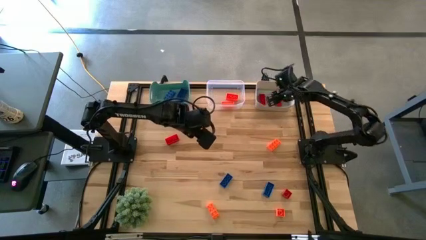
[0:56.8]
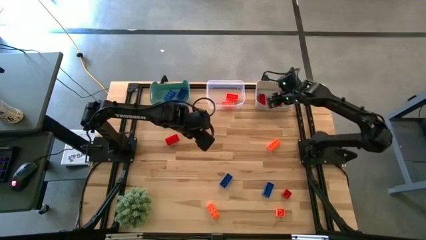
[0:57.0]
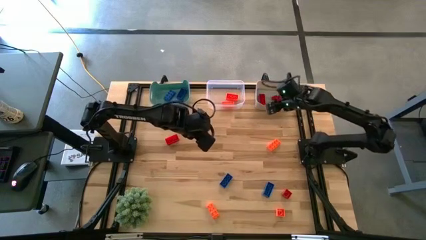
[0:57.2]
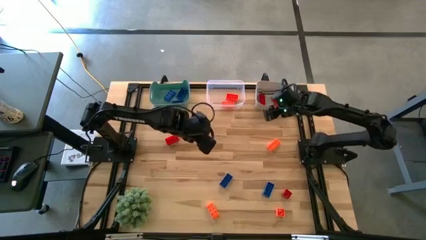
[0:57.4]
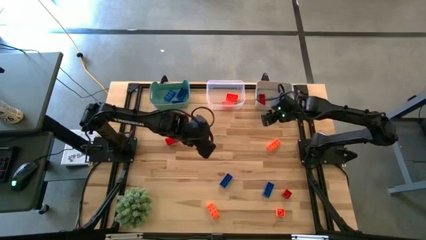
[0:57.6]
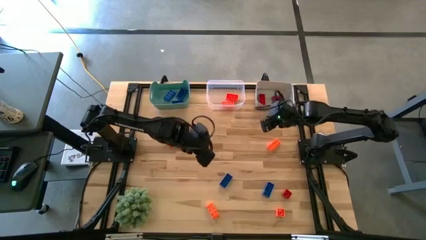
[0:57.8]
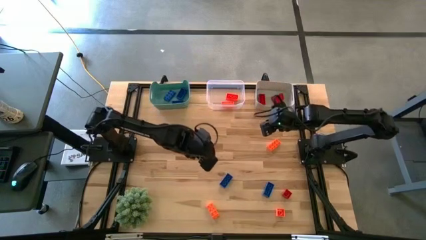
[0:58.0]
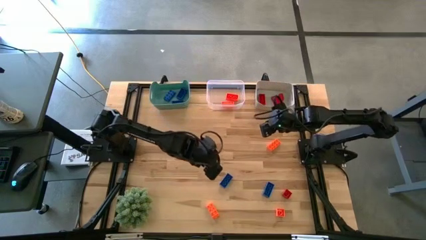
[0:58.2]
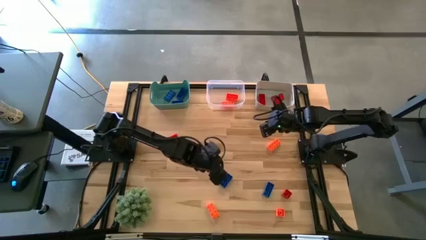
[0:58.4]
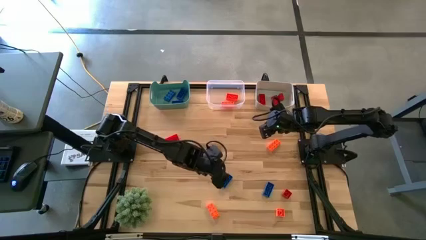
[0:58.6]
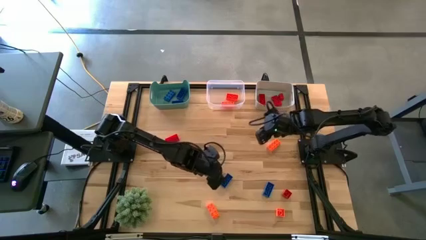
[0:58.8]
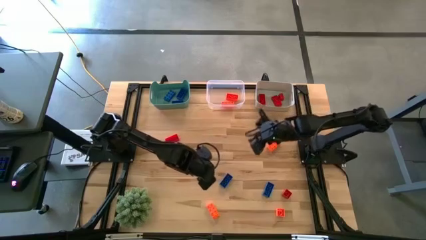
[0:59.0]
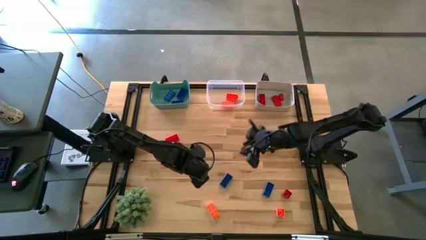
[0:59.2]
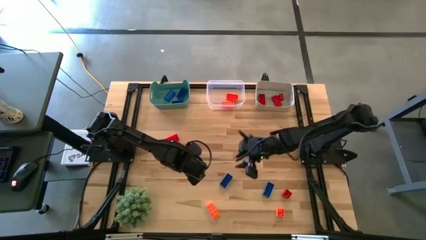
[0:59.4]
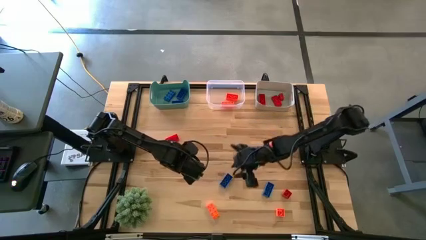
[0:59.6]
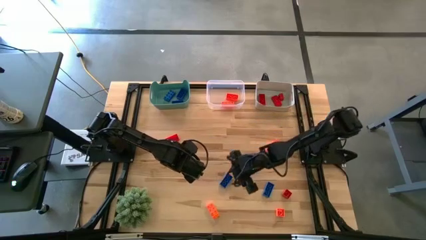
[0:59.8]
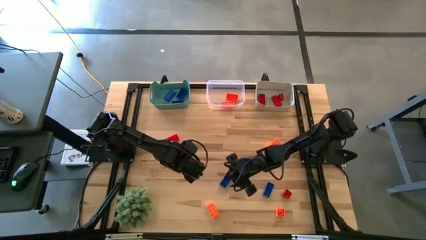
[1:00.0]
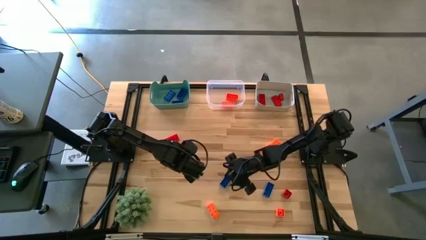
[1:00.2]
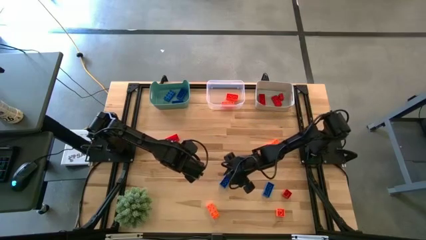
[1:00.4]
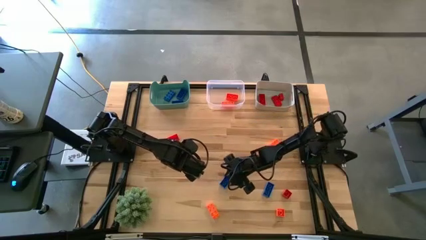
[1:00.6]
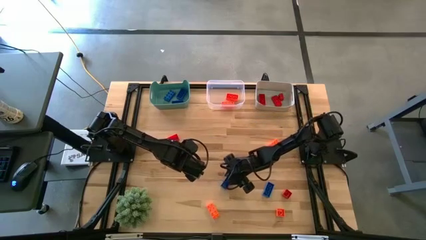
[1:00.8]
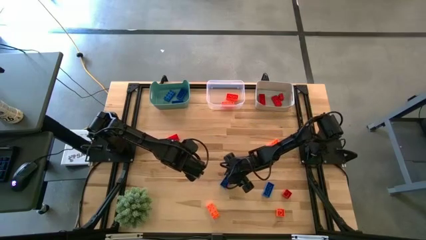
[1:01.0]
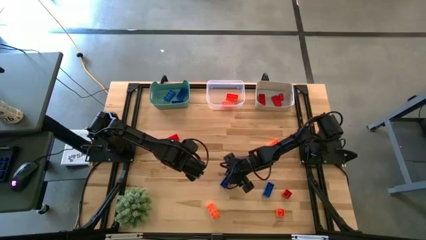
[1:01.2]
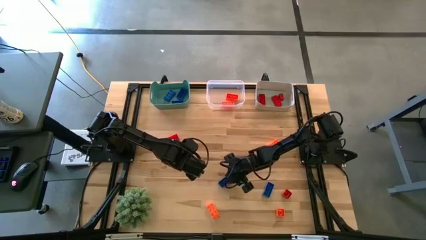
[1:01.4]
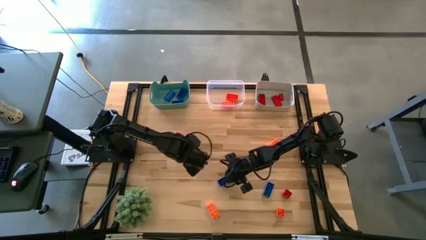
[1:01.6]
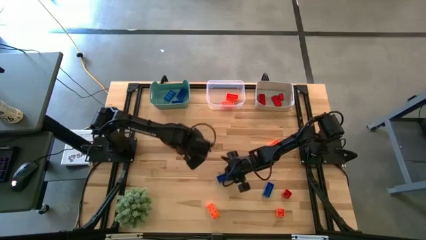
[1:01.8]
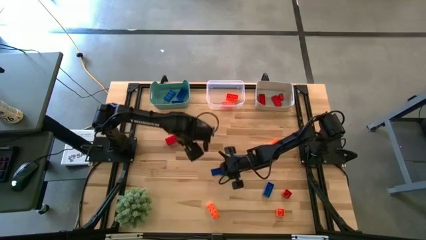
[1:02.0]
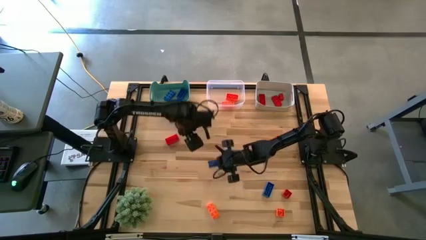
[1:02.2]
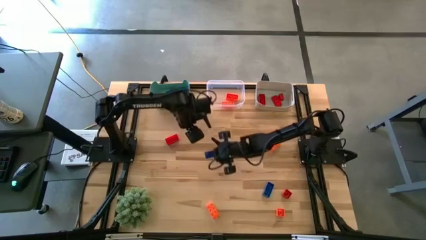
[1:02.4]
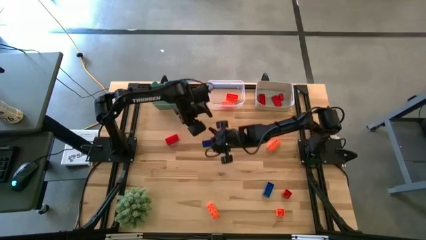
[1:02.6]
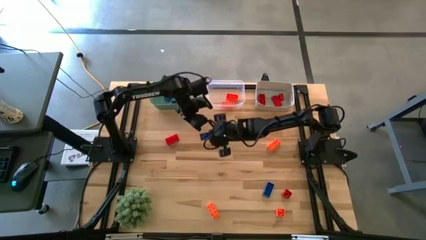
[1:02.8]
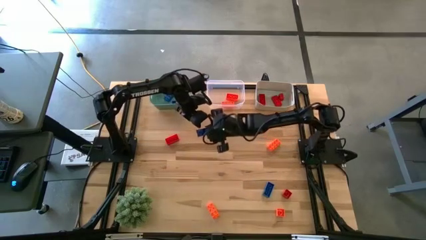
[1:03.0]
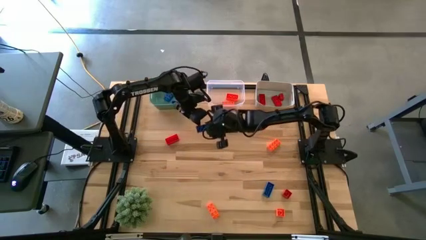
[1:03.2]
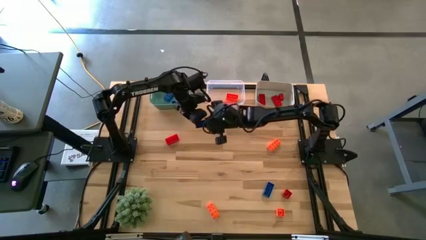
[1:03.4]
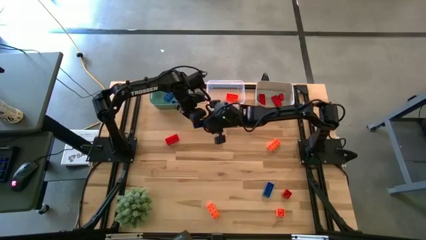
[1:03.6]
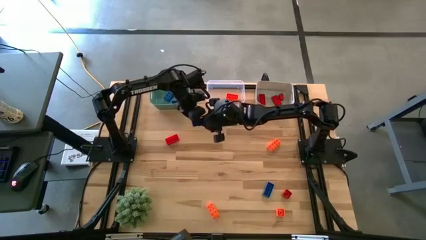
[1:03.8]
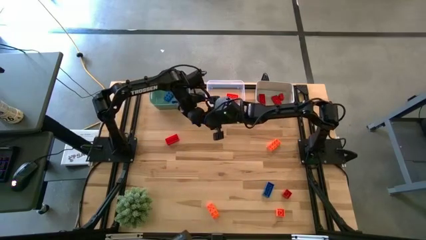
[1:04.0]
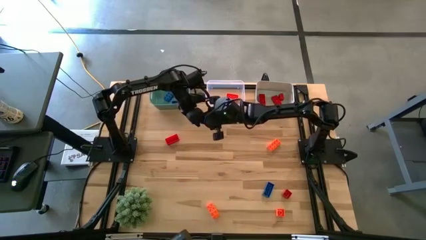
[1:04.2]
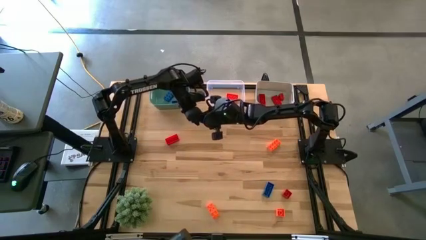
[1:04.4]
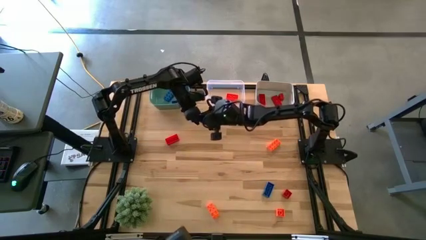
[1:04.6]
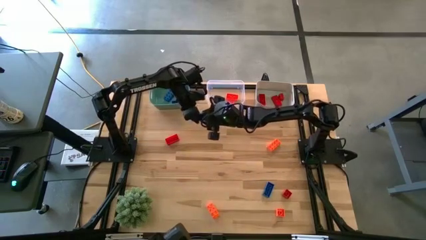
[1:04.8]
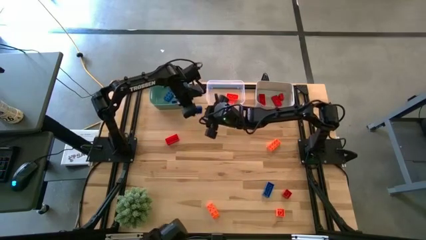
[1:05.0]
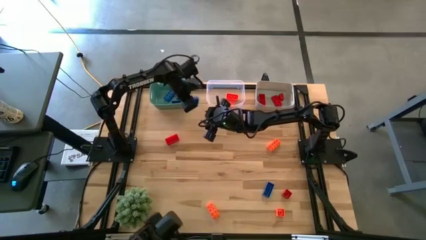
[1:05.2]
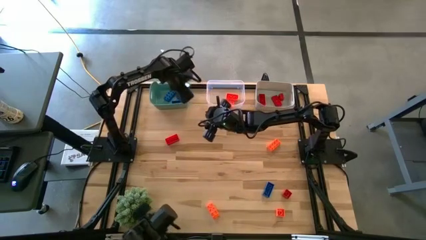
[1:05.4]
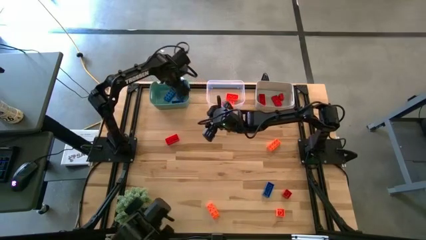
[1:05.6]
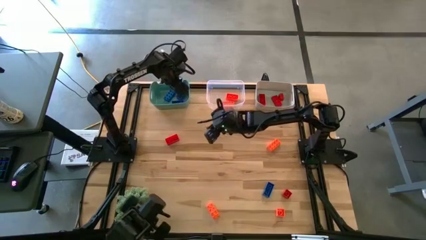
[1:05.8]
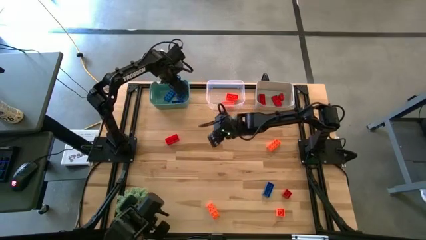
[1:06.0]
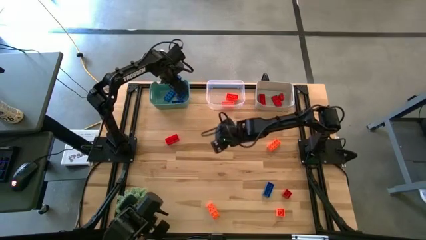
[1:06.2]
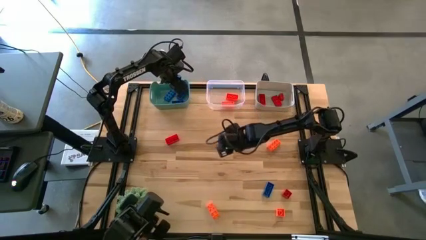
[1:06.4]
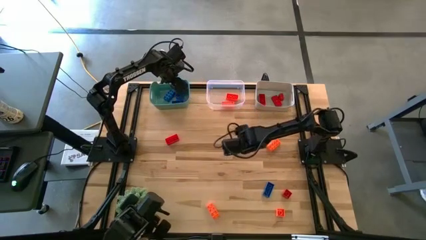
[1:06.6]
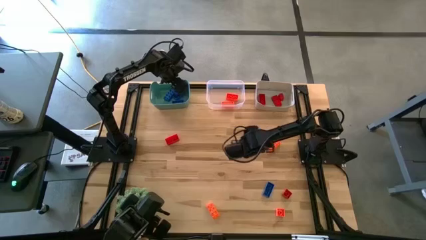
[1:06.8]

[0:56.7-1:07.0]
Task: Sort & place blocks by color
Put the blue game piece into the green bin

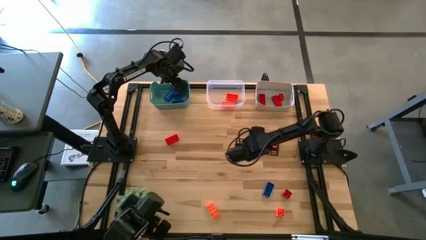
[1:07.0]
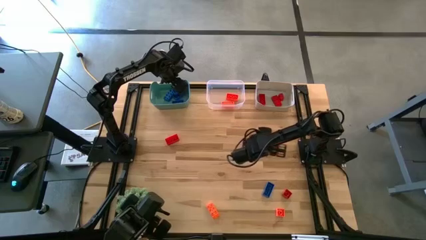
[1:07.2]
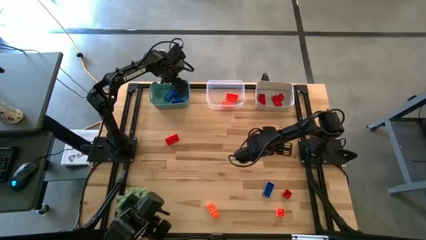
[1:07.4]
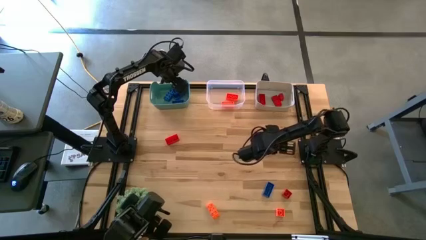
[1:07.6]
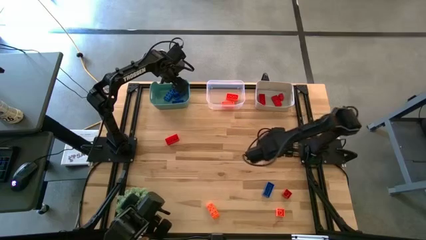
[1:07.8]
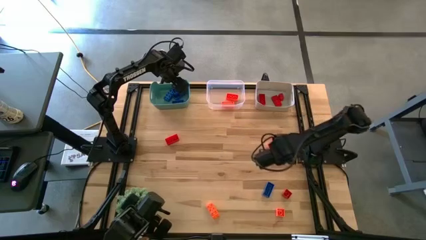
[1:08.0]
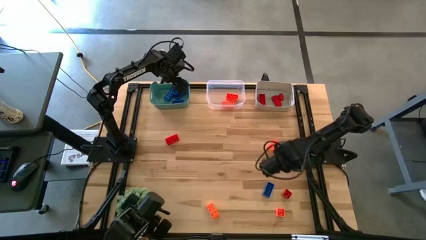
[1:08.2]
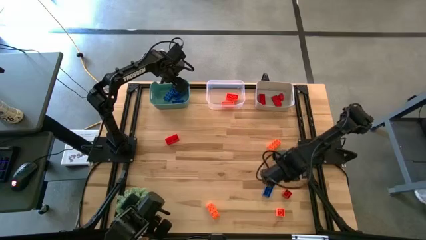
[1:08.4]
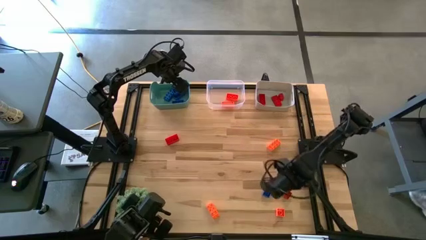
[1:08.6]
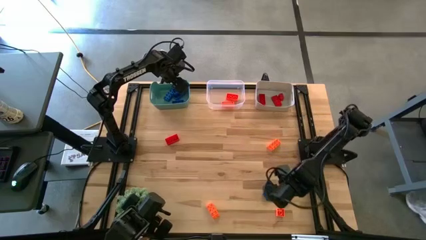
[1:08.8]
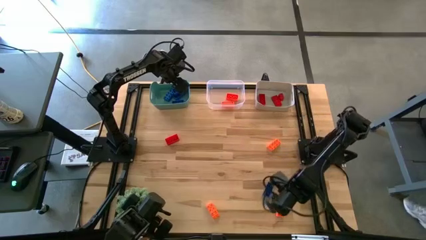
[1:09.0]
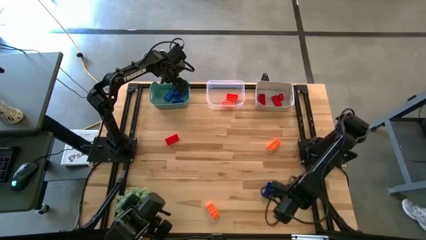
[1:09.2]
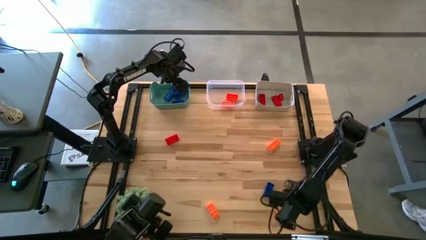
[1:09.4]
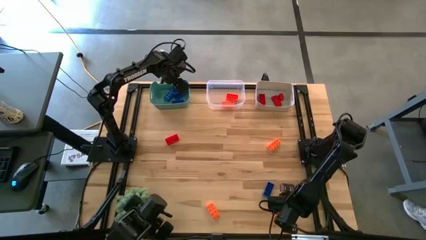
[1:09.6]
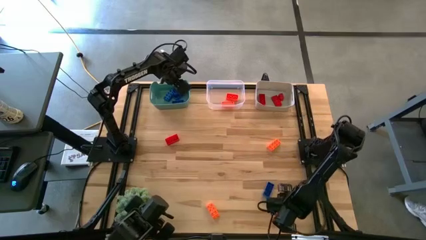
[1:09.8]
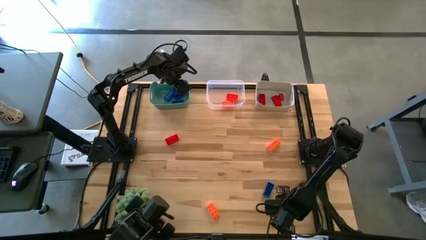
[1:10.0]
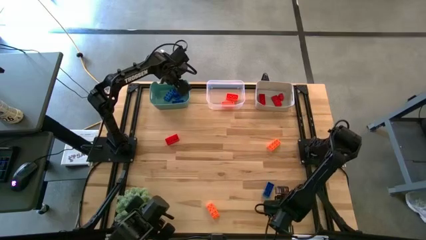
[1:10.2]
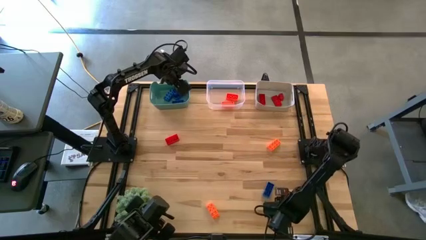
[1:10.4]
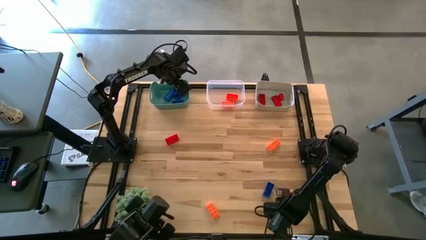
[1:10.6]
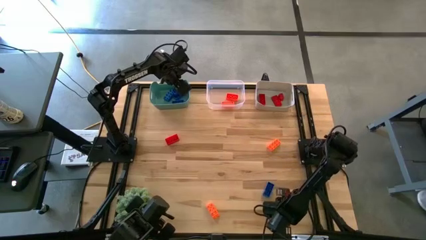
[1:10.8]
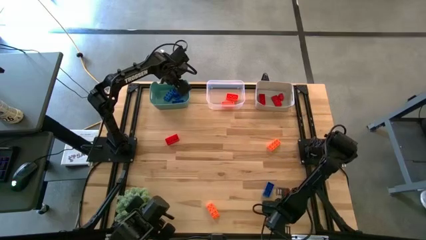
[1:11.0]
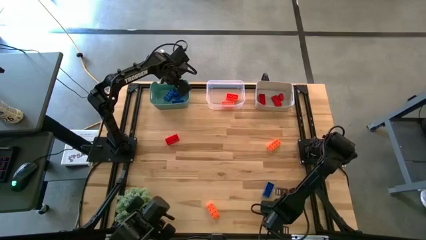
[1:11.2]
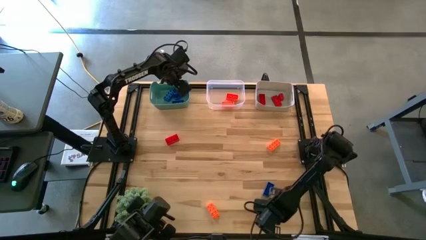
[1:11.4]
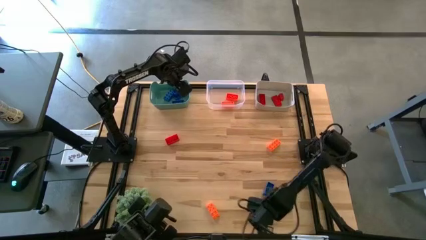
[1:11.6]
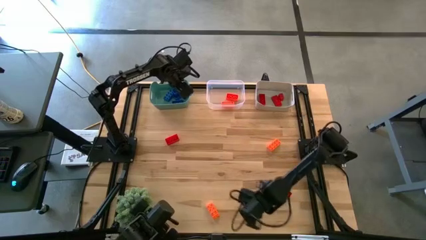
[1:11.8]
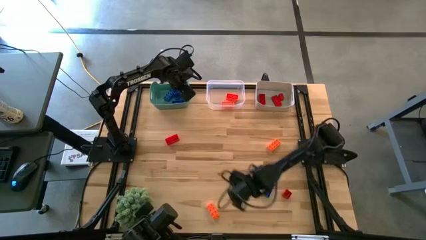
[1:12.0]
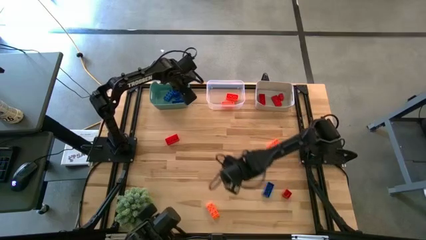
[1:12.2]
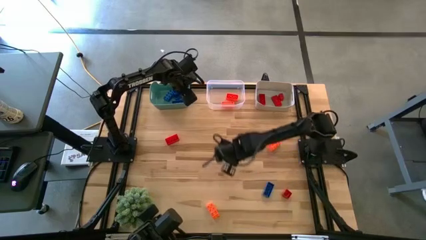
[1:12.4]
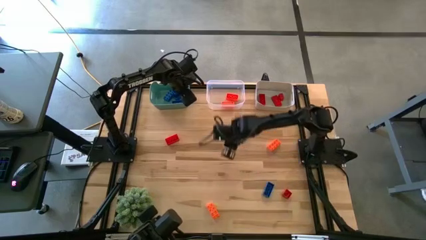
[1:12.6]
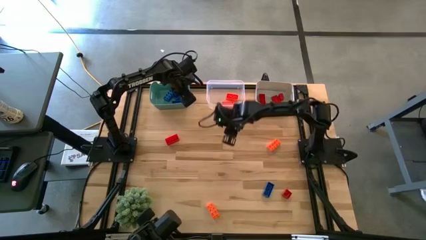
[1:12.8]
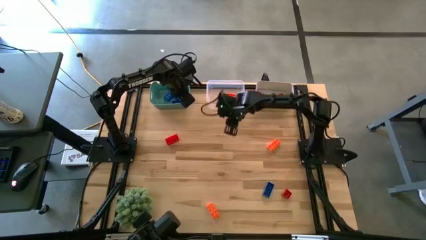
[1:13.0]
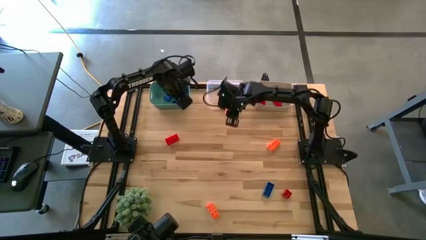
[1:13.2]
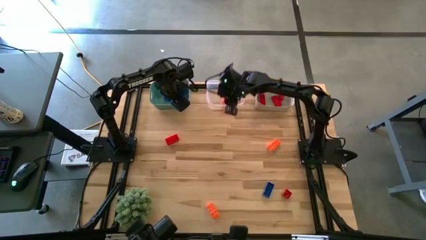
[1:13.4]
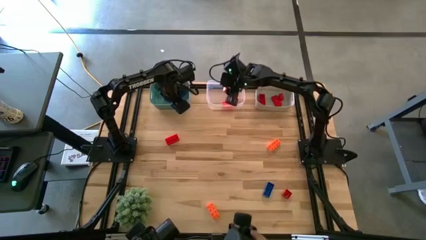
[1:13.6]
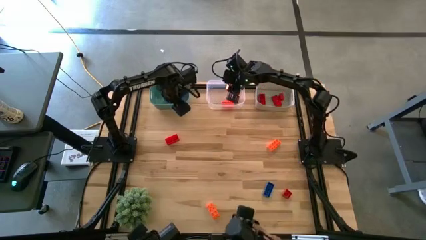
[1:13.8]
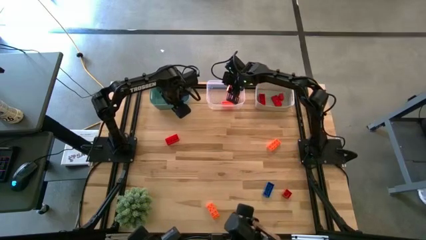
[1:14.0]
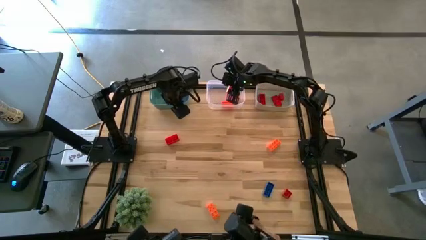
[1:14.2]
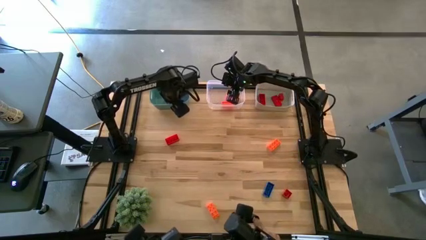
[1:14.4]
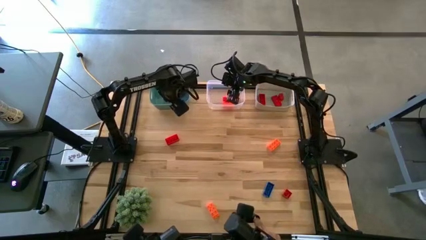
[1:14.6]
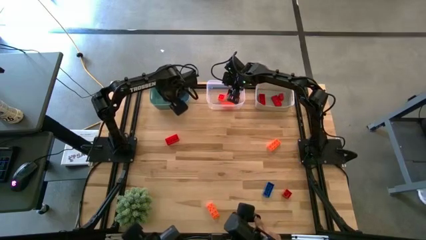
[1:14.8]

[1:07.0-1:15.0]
Put the orange game piece into the transparent bin
